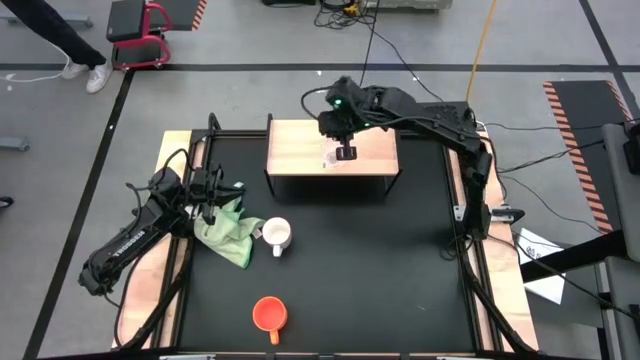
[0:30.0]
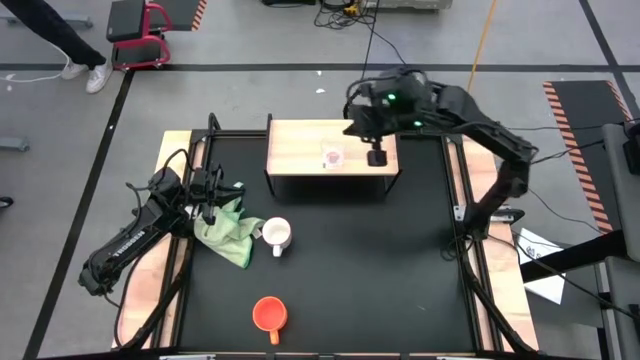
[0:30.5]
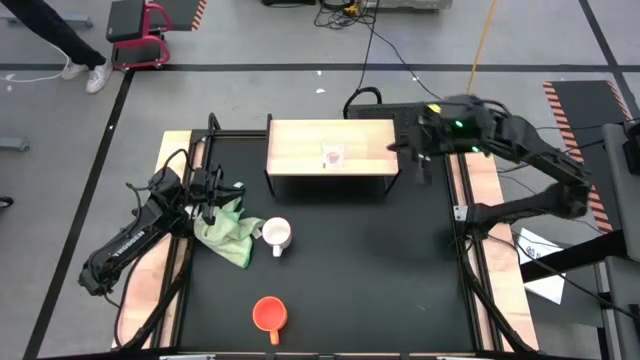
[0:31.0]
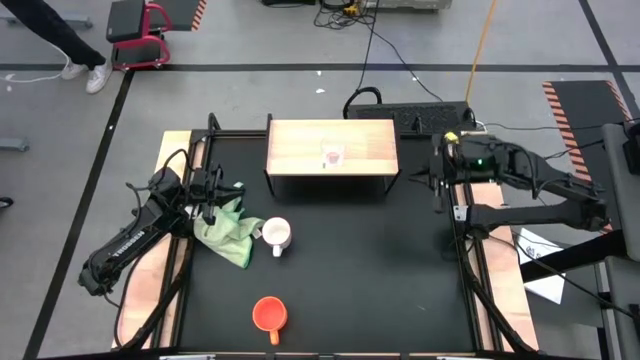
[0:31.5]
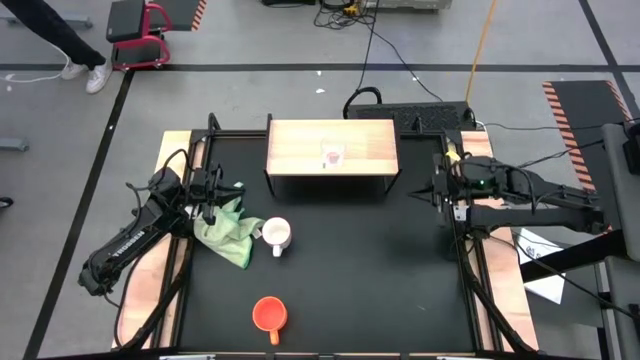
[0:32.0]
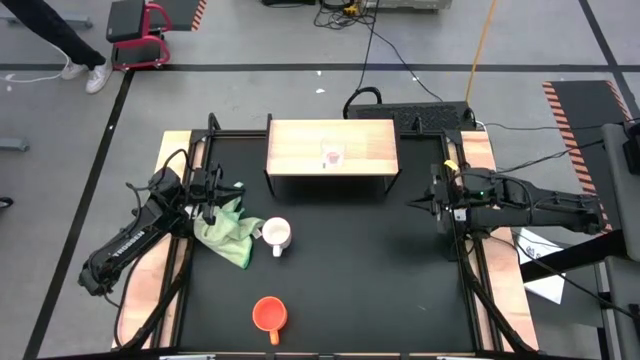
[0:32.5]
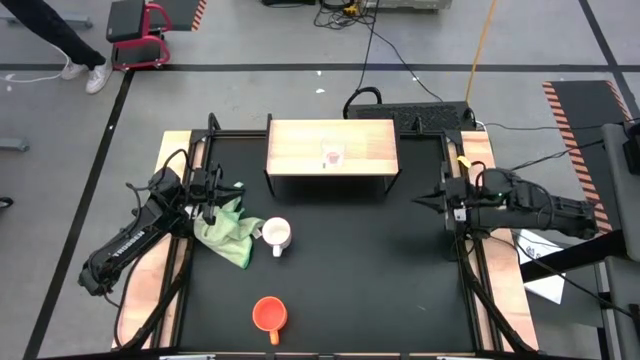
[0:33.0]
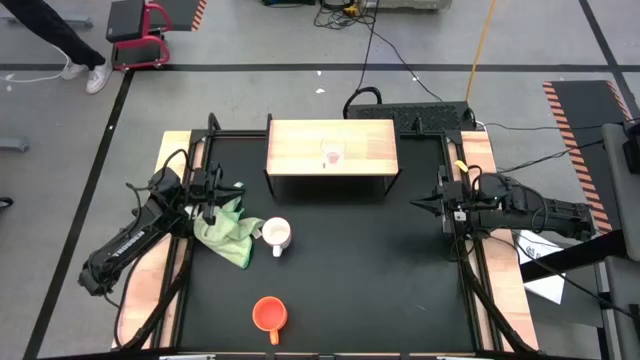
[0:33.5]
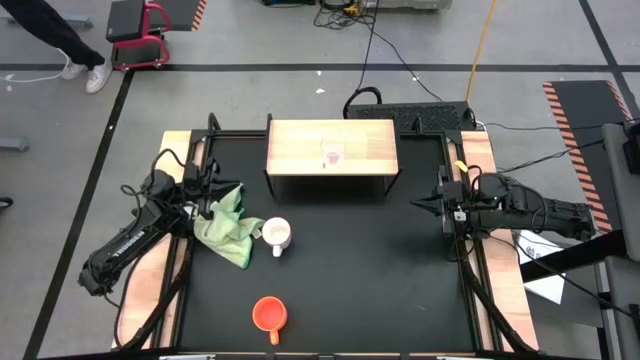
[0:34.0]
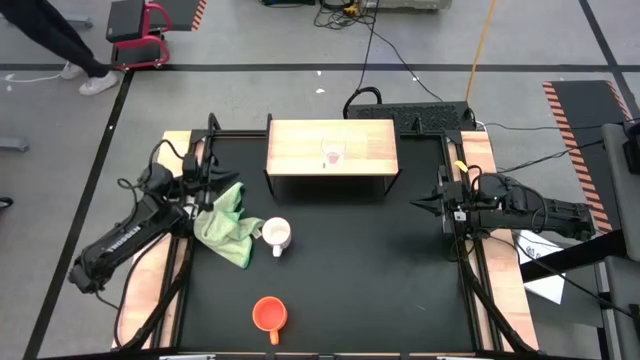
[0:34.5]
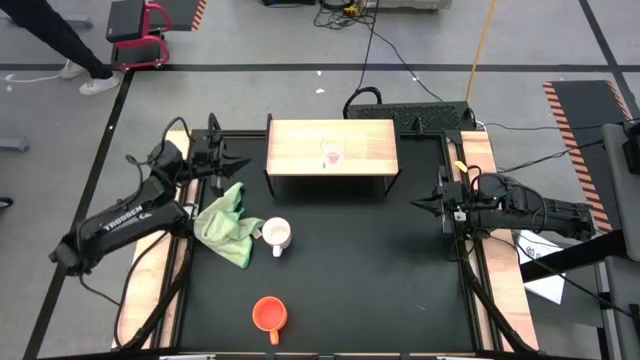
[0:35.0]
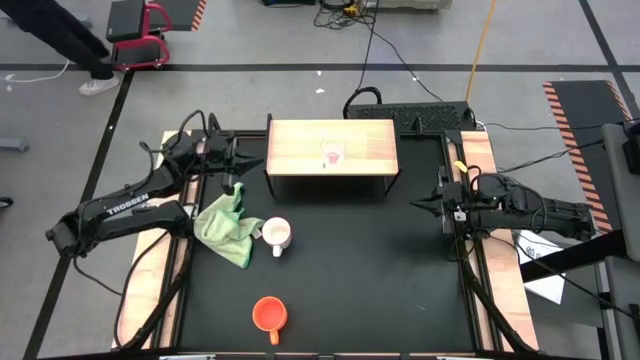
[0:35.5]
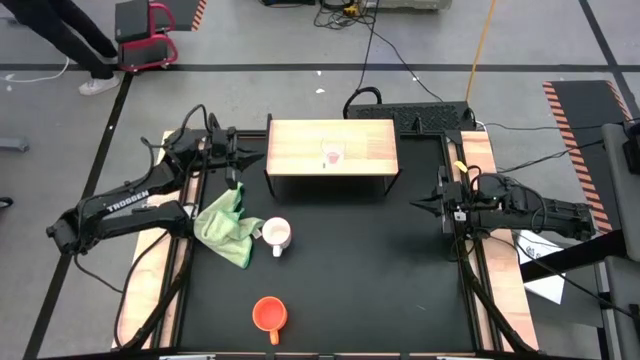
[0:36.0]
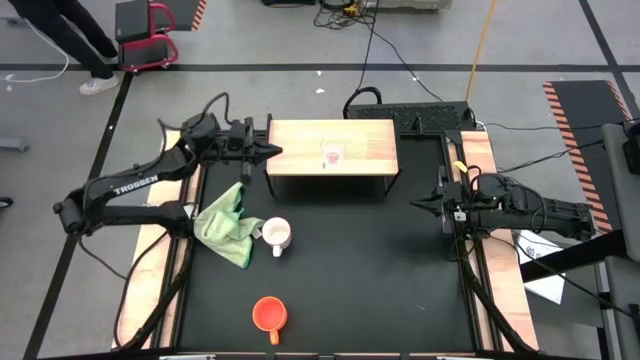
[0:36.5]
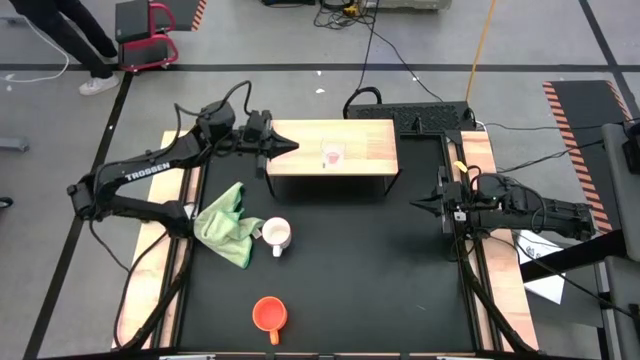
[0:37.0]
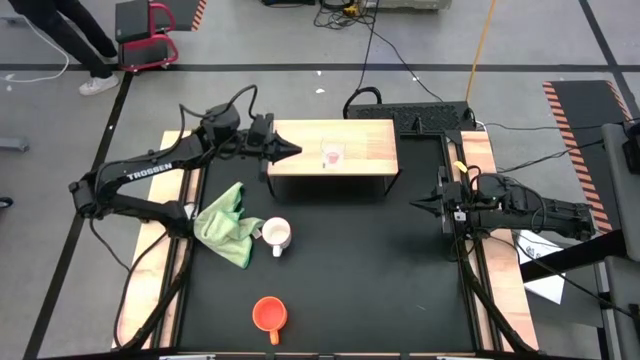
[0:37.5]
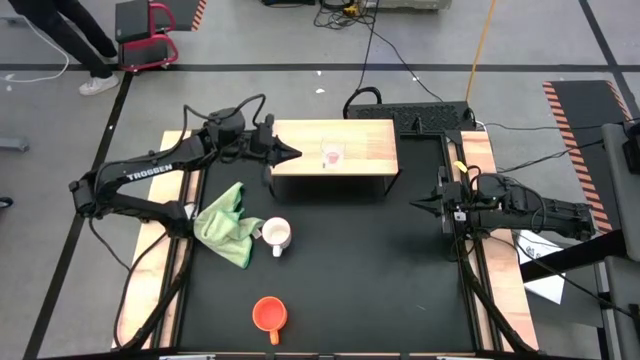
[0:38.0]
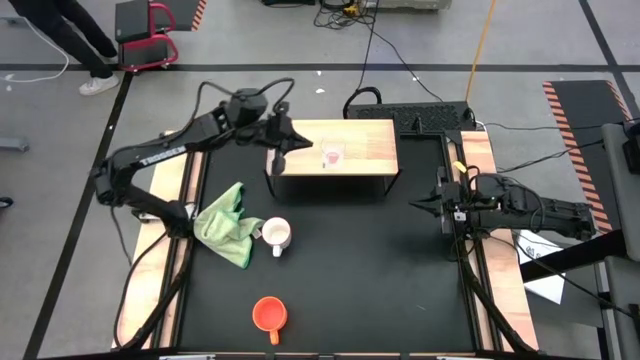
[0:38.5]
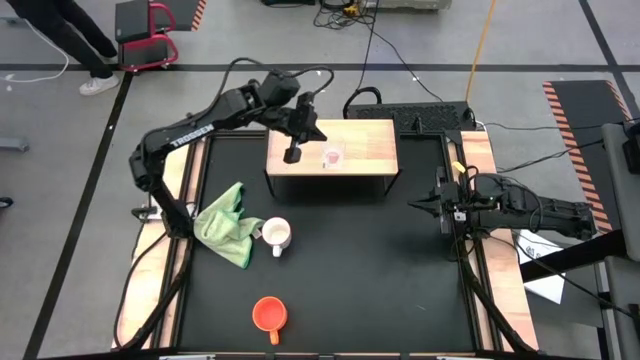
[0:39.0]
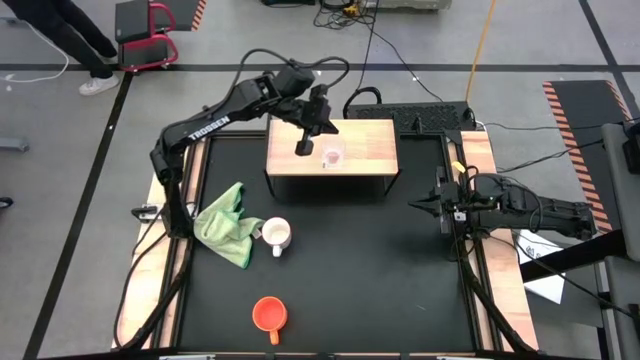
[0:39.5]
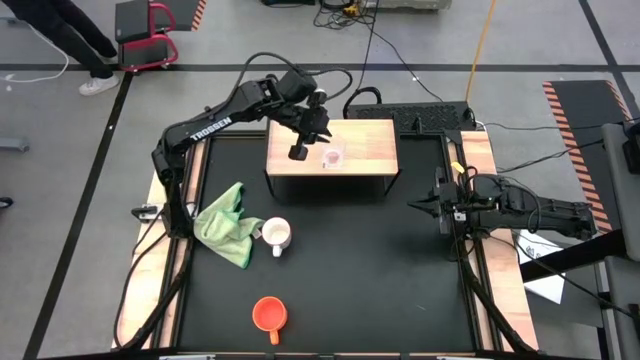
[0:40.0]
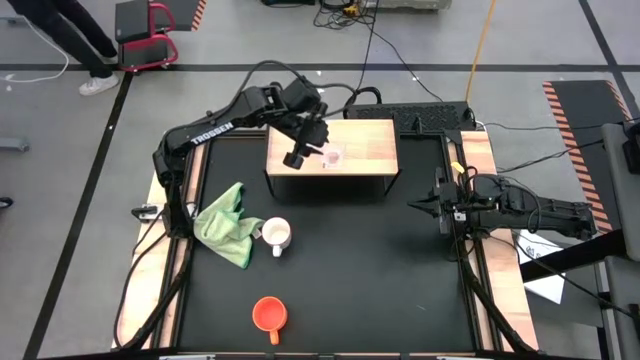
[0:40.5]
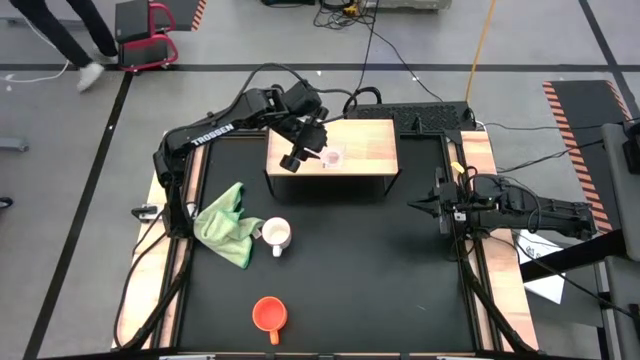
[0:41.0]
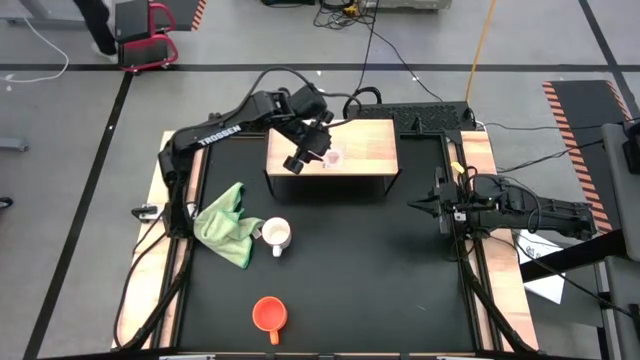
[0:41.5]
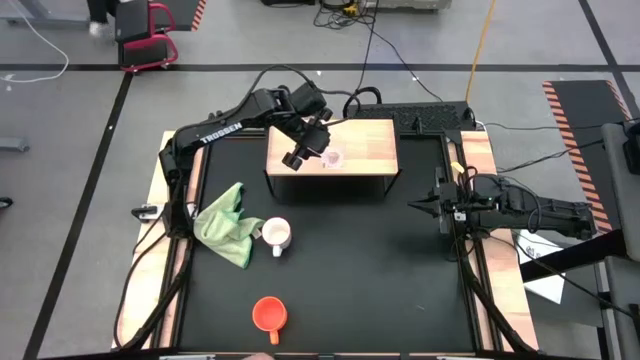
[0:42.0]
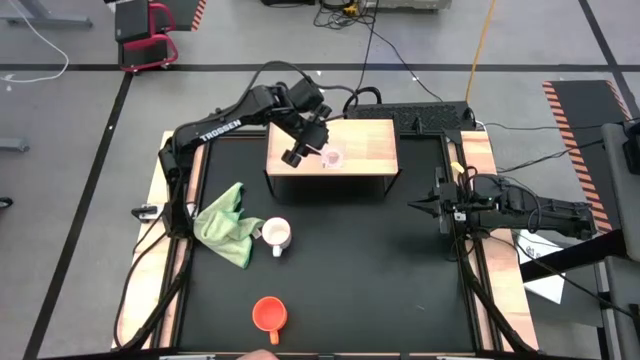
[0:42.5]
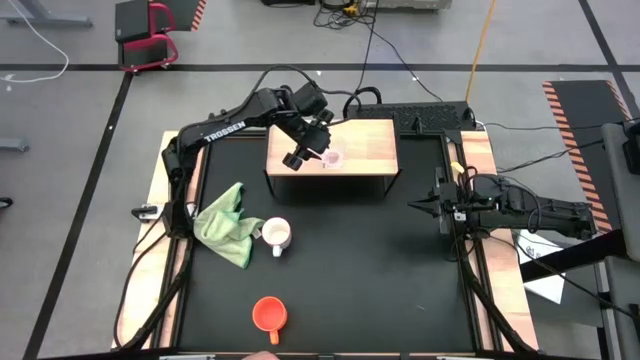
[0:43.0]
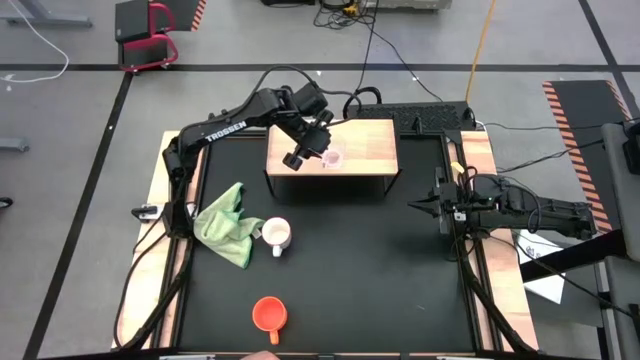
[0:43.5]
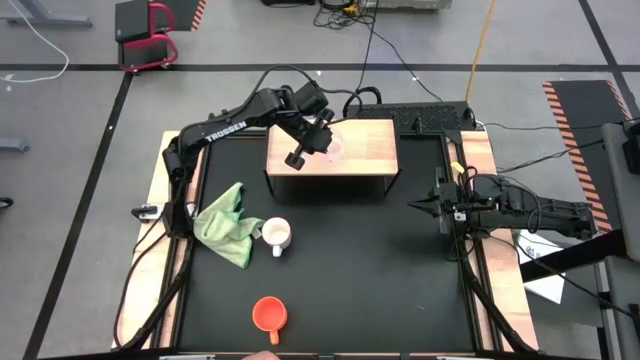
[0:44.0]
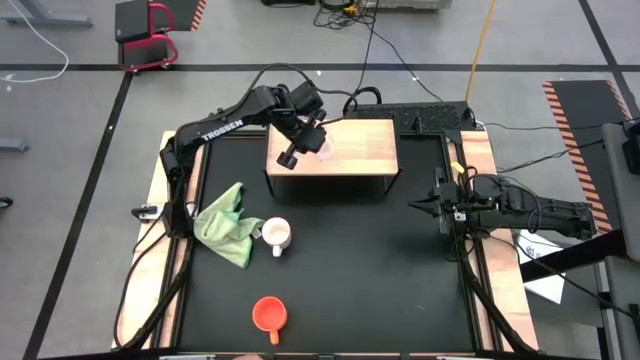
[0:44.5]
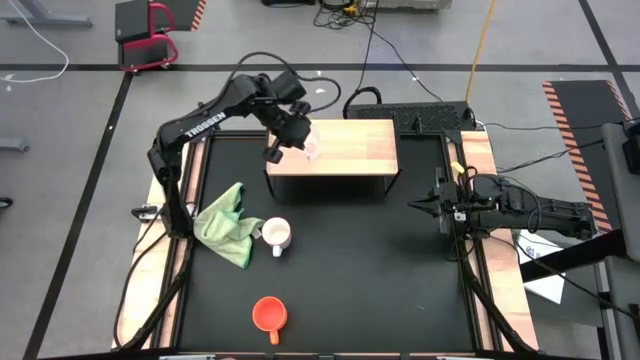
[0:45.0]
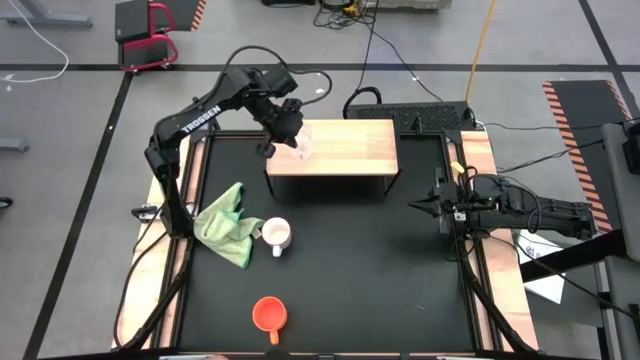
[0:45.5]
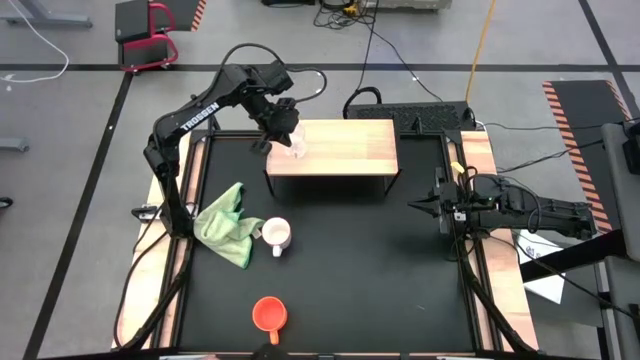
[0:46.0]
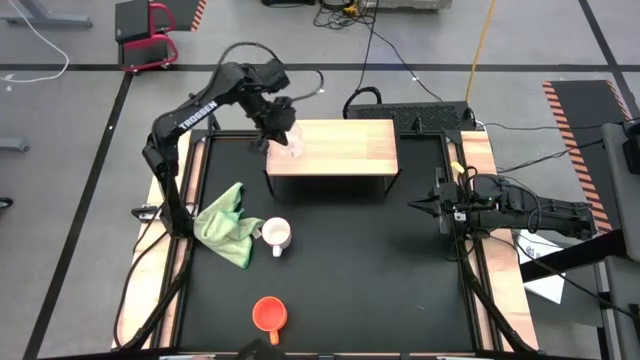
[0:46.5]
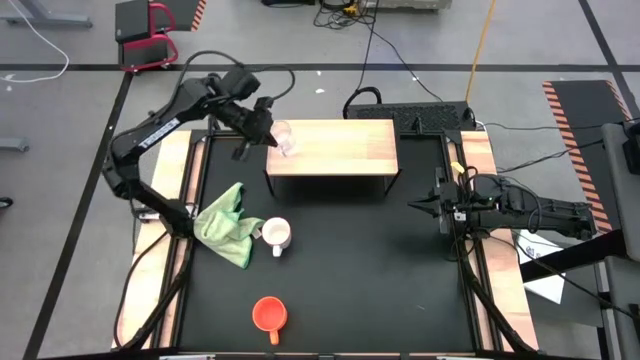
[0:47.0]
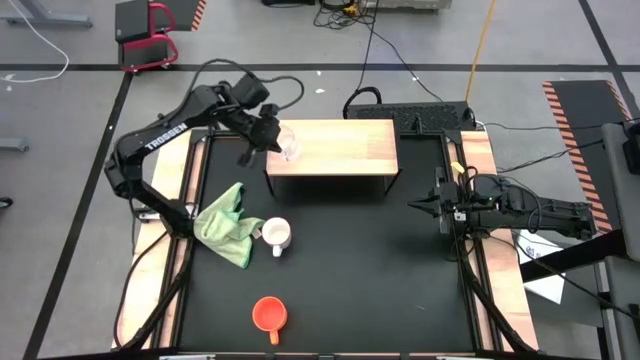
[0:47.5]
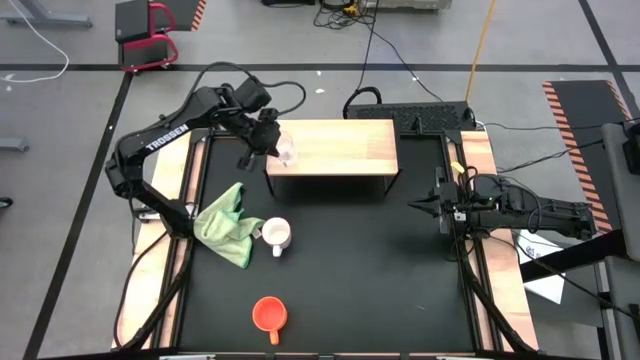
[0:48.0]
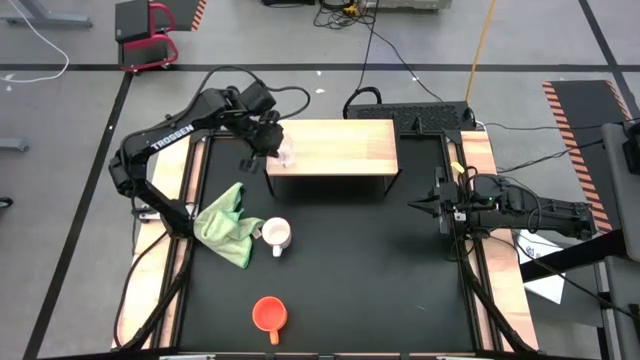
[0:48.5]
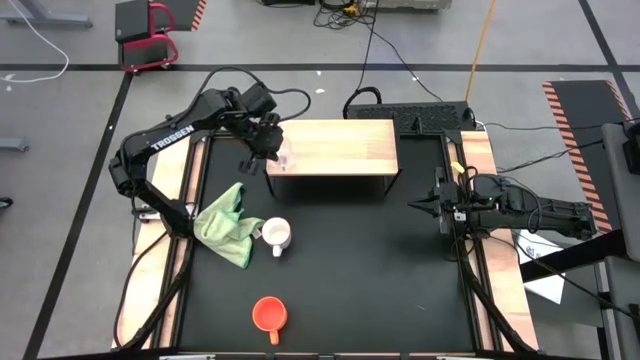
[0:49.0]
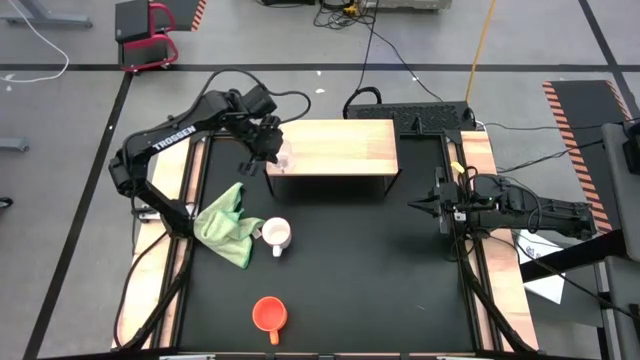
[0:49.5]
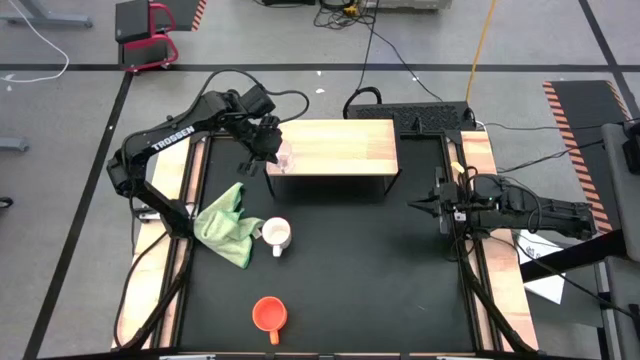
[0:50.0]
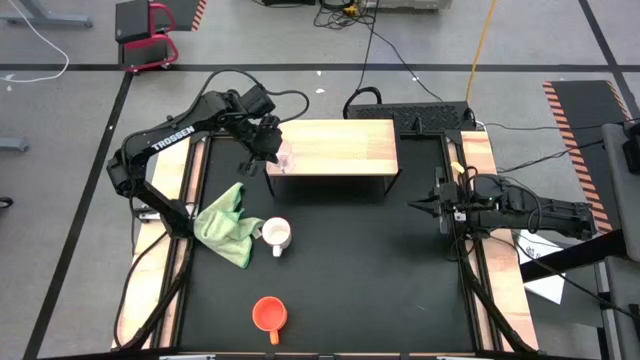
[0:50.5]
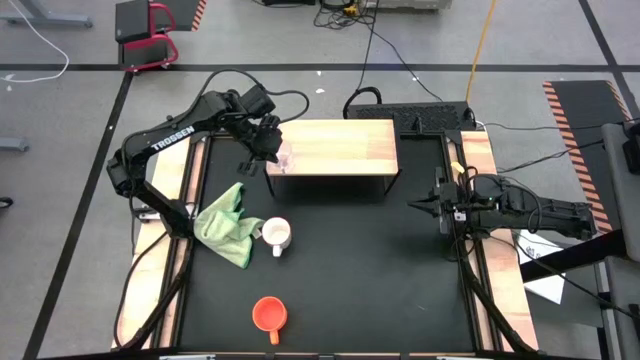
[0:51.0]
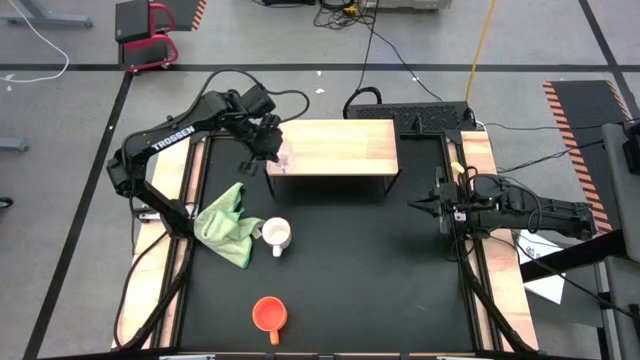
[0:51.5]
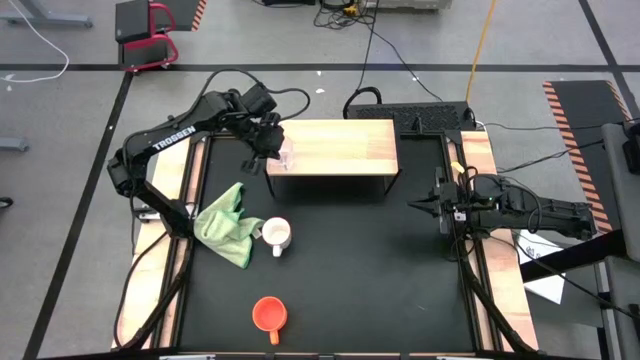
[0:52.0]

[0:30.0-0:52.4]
Task: Stack small to large cups/mugs on shelf
Put the transparent mug on the shelf
